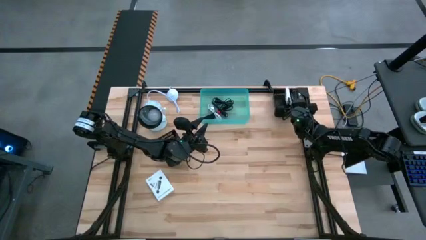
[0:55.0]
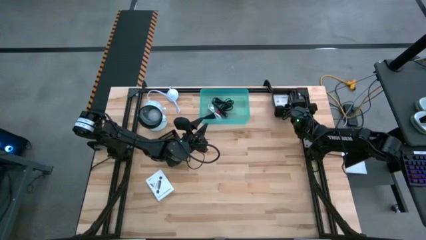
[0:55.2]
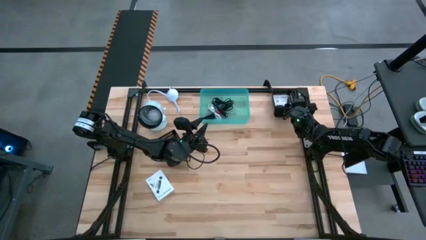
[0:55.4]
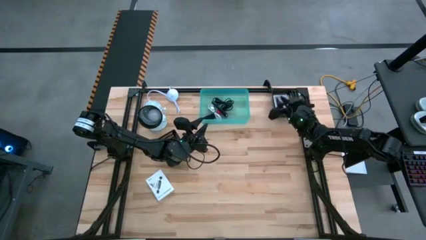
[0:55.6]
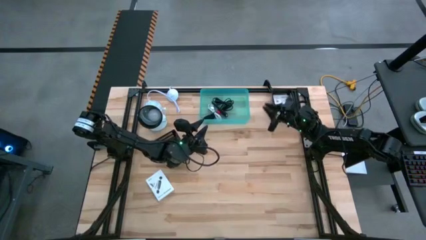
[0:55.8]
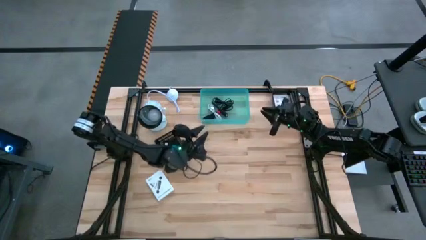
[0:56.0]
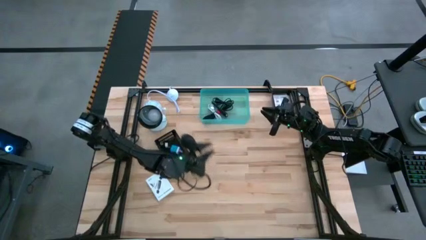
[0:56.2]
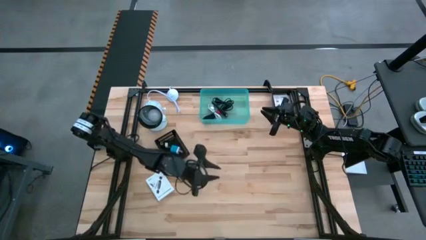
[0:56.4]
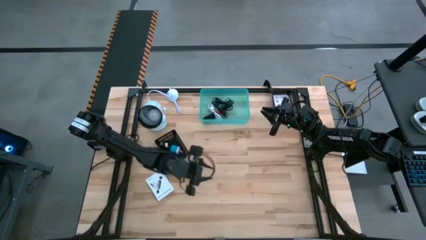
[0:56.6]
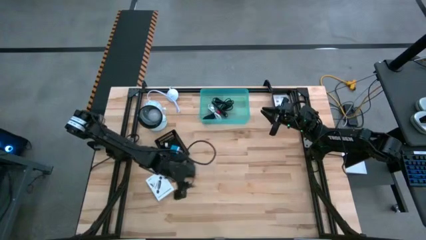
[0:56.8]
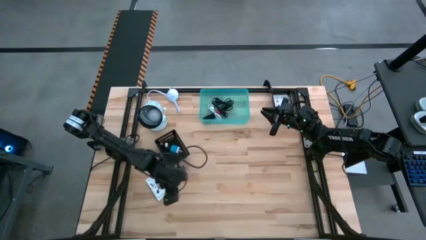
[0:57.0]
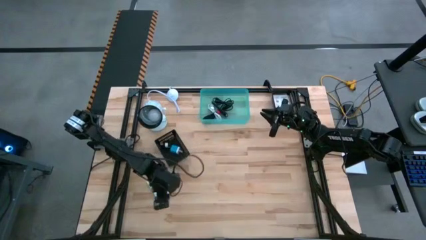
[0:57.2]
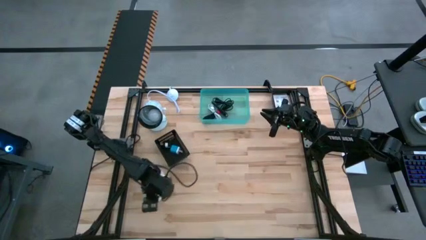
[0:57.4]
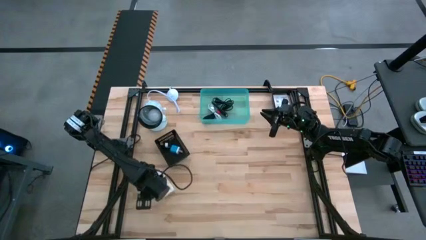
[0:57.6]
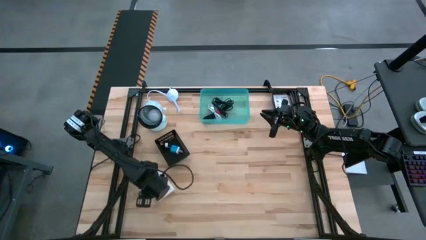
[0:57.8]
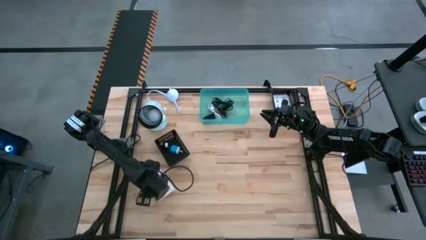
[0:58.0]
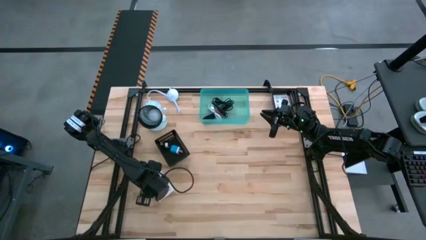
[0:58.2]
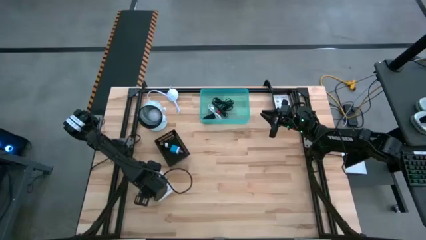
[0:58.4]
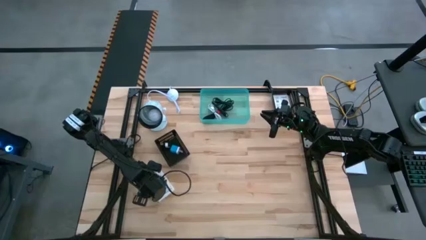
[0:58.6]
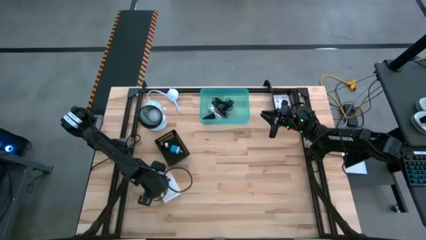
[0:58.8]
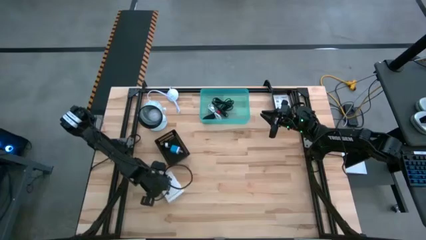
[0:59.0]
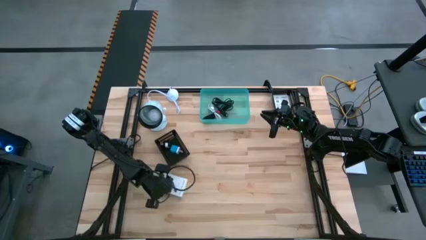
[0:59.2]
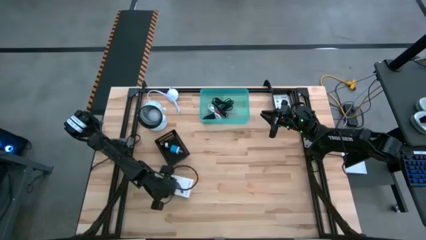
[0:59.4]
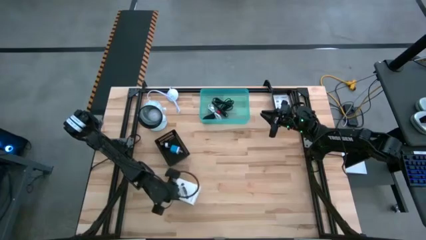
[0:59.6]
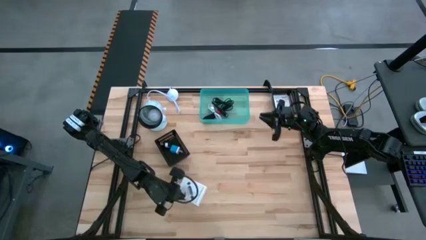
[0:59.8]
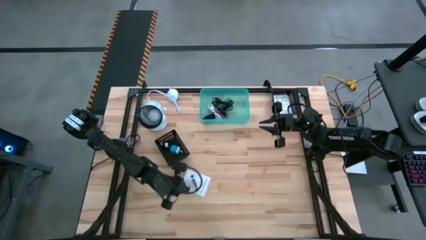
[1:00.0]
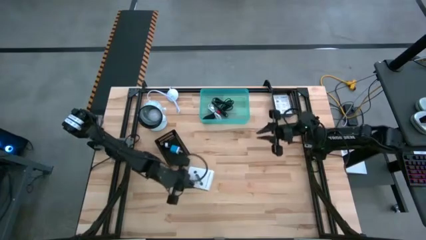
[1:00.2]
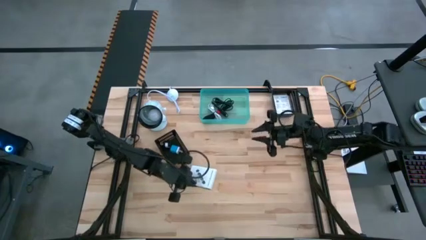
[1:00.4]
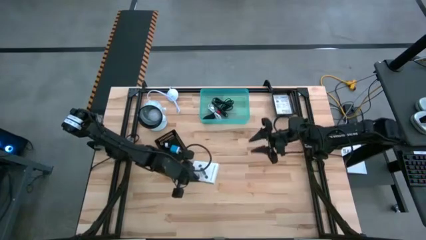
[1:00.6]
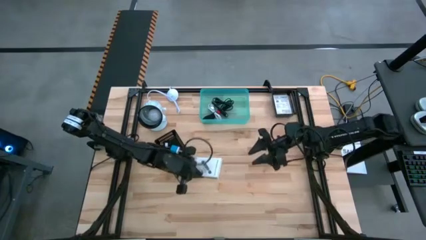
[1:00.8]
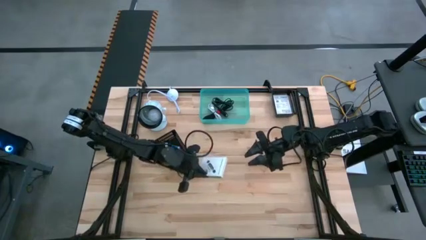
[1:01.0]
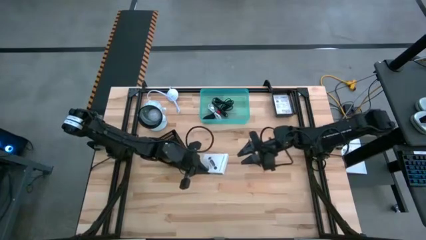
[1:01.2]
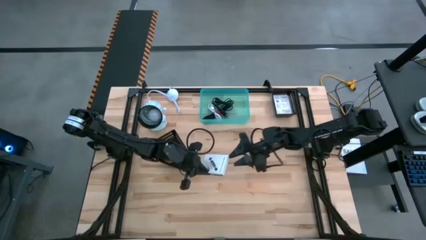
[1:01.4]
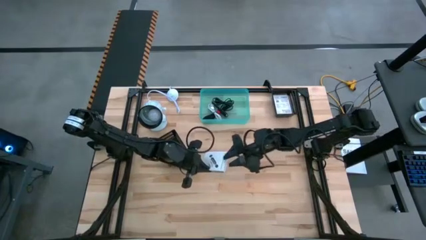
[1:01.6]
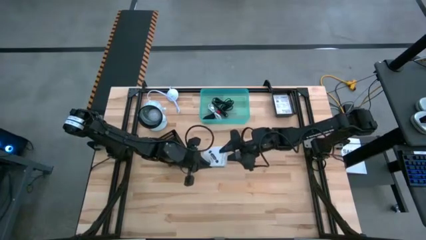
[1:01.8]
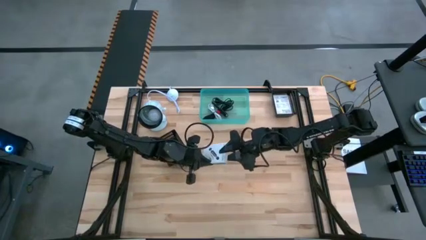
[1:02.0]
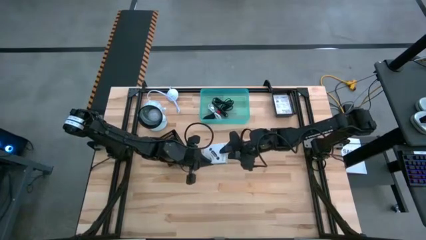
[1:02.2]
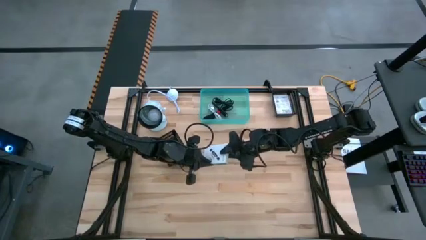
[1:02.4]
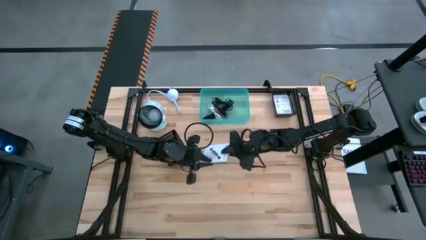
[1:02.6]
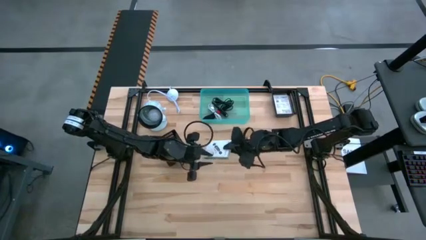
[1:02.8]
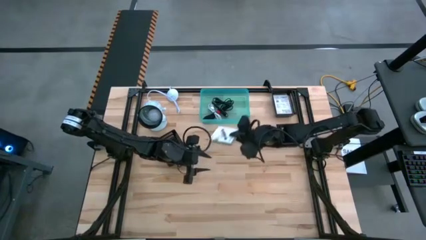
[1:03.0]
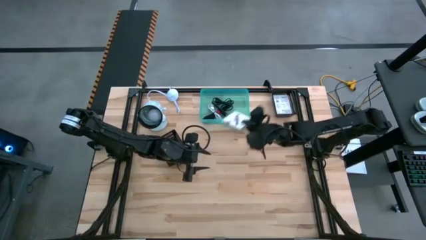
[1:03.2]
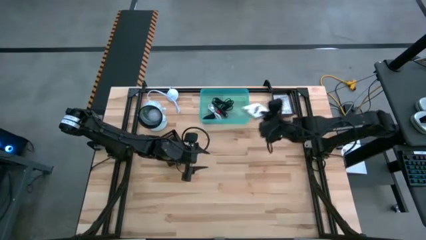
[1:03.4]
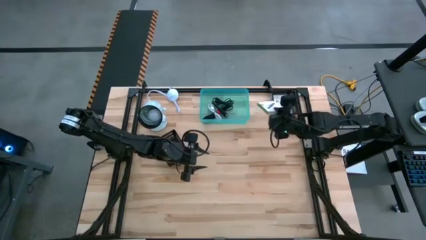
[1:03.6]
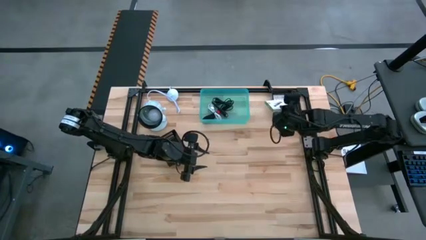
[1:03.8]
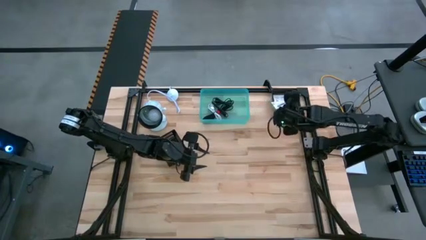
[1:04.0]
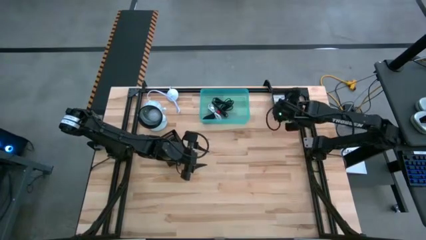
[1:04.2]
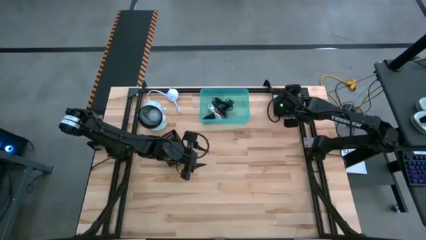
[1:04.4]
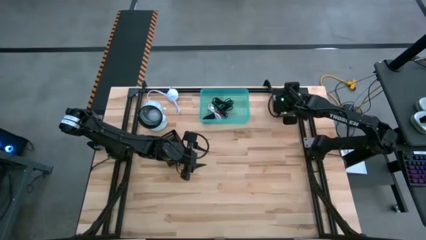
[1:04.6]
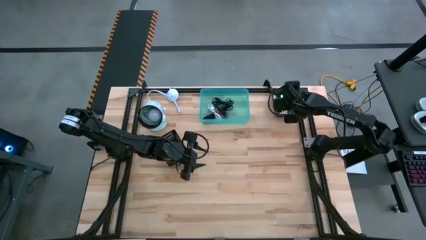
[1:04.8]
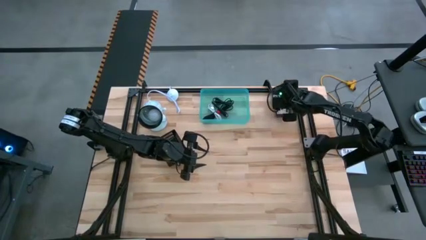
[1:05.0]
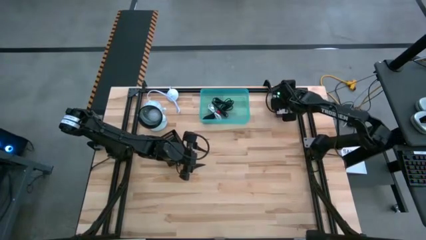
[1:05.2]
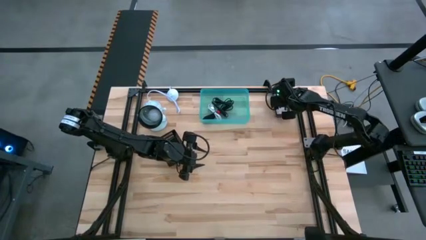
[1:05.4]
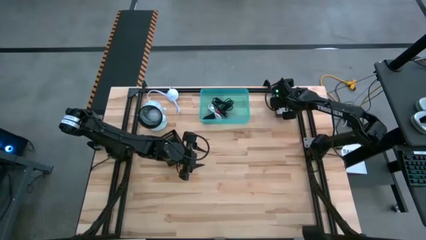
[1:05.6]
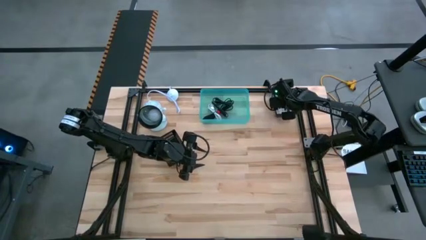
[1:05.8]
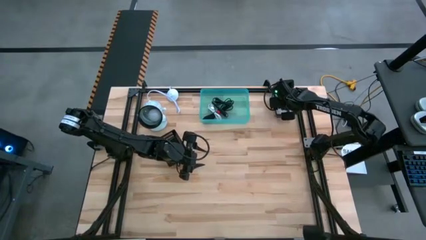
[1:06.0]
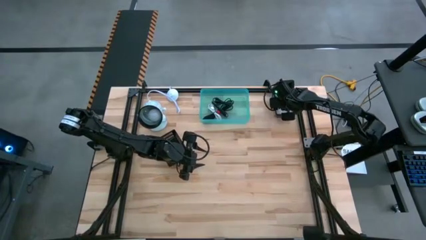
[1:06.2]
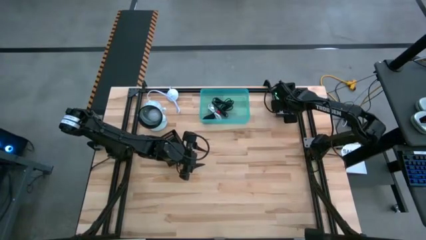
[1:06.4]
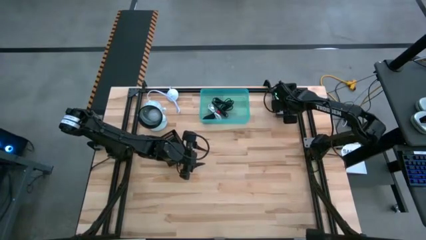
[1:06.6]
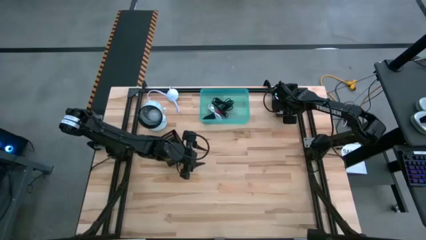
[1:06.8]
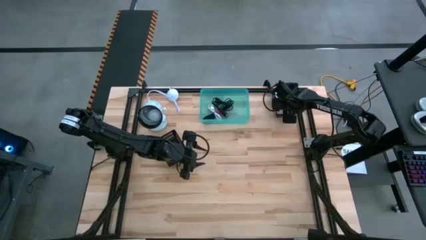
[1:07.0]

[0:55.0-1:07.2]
Task: Pick and place items into bin
Put the right card reader box into the right black basket
